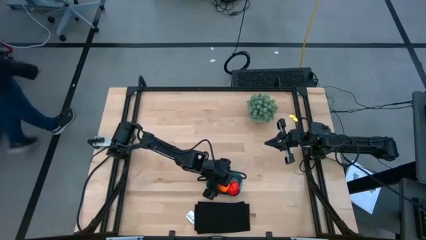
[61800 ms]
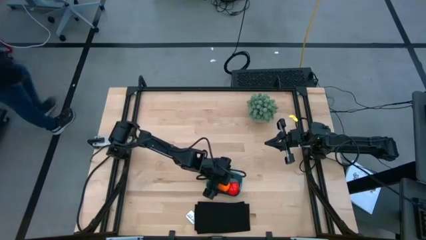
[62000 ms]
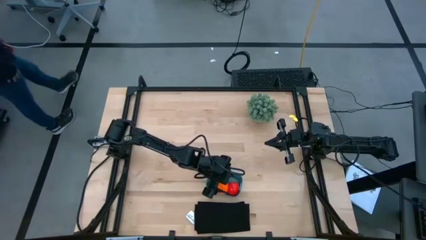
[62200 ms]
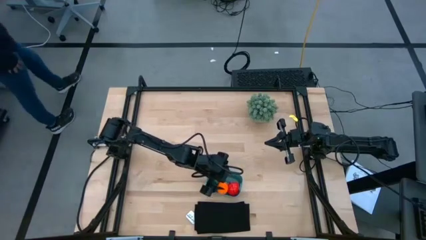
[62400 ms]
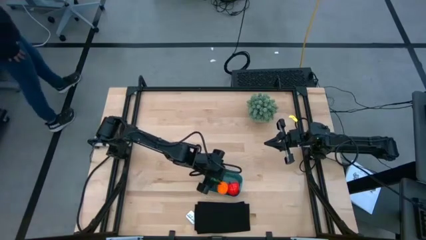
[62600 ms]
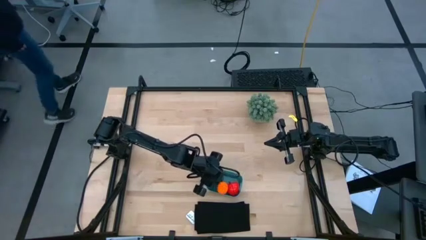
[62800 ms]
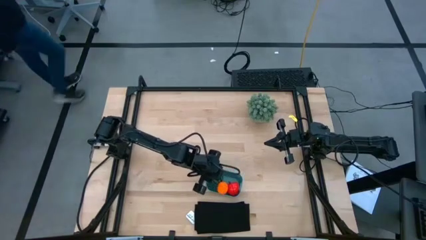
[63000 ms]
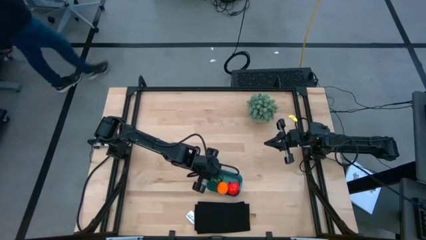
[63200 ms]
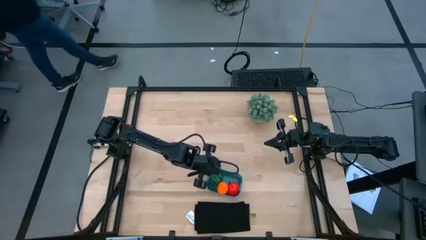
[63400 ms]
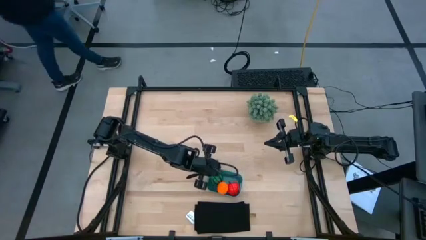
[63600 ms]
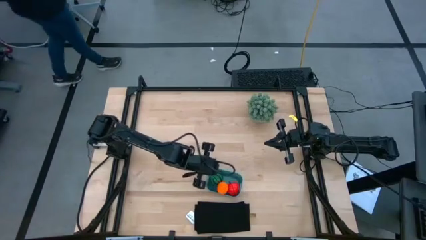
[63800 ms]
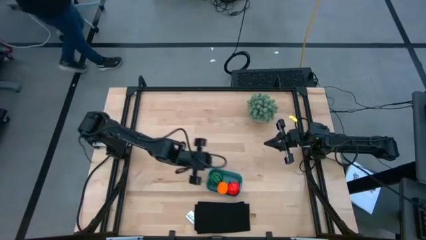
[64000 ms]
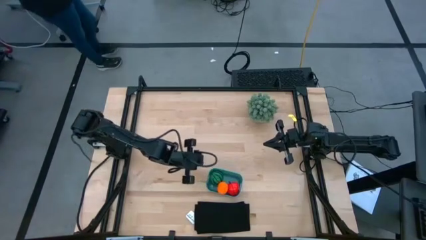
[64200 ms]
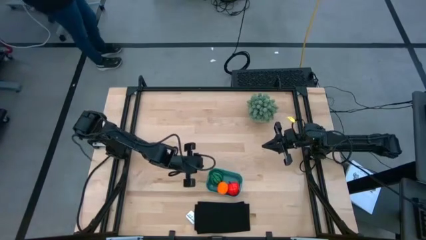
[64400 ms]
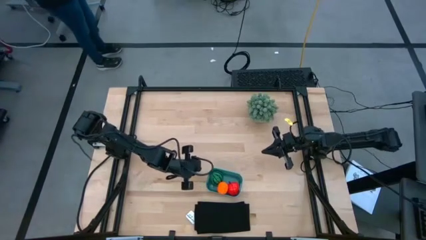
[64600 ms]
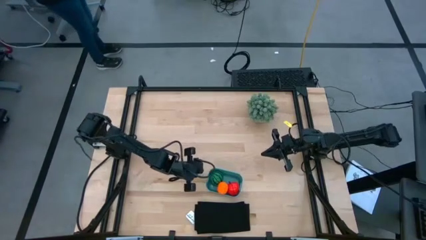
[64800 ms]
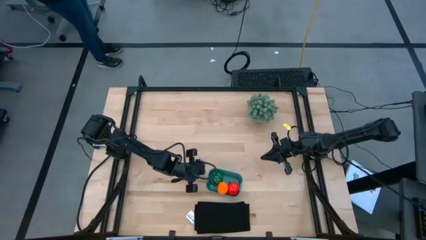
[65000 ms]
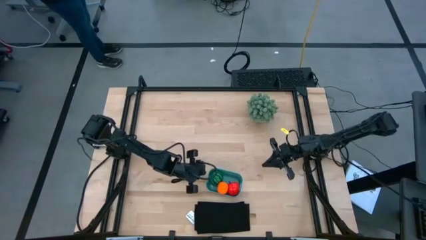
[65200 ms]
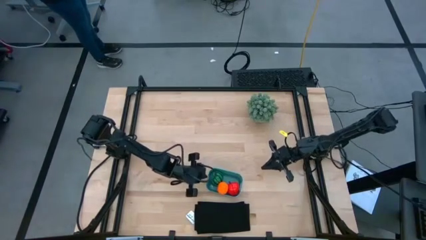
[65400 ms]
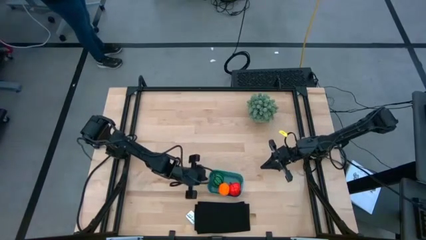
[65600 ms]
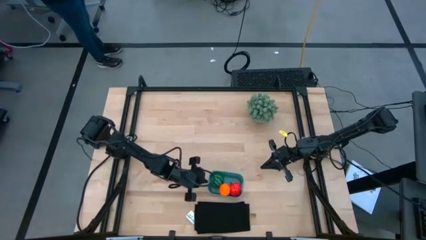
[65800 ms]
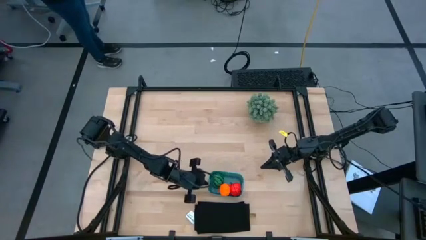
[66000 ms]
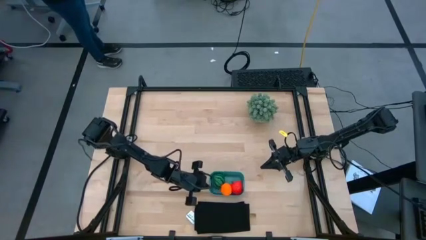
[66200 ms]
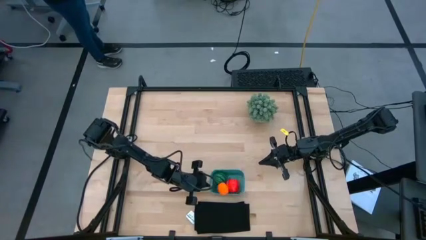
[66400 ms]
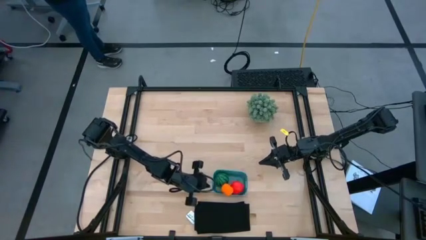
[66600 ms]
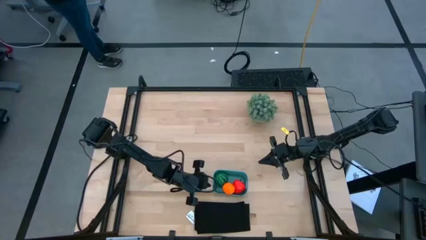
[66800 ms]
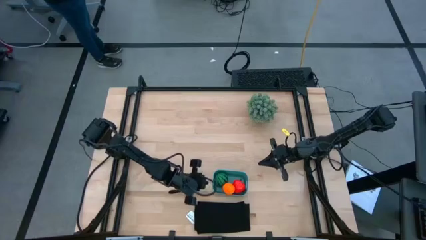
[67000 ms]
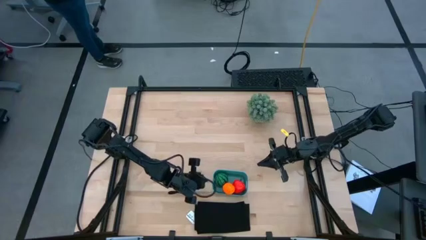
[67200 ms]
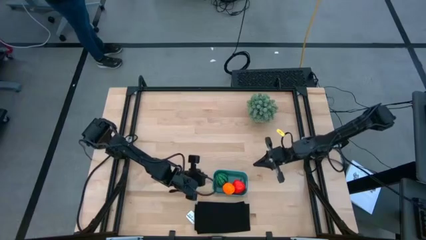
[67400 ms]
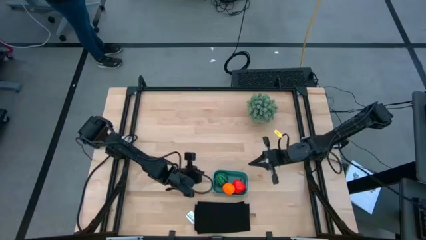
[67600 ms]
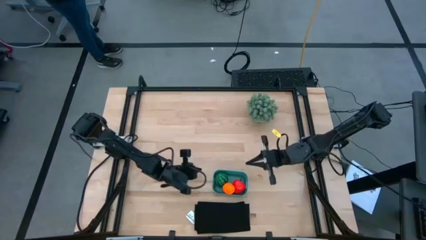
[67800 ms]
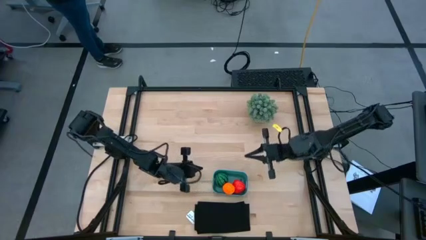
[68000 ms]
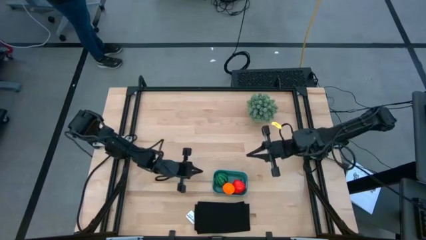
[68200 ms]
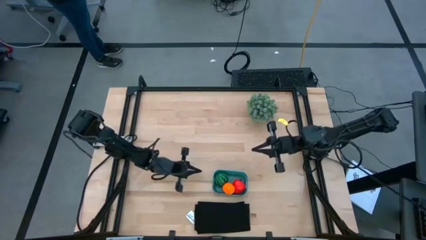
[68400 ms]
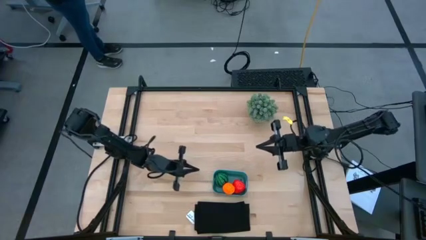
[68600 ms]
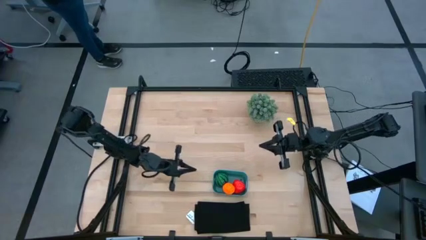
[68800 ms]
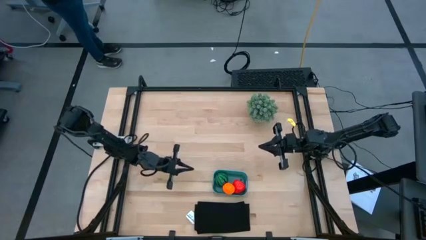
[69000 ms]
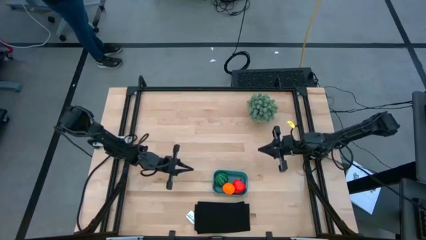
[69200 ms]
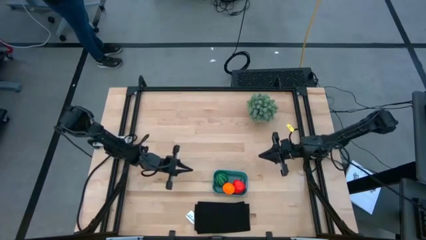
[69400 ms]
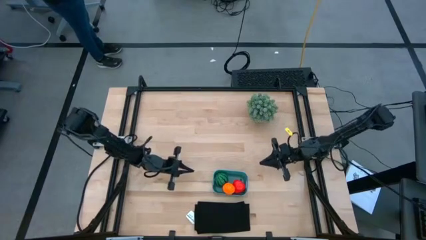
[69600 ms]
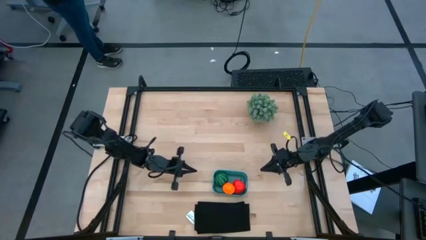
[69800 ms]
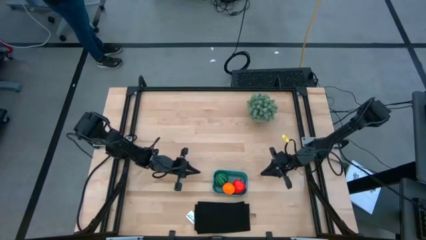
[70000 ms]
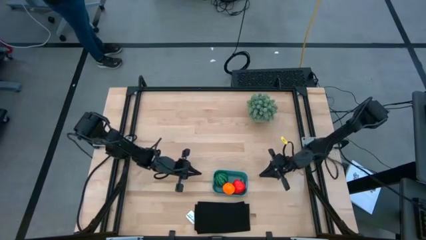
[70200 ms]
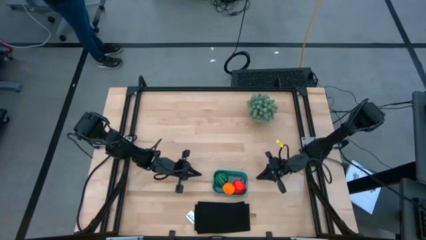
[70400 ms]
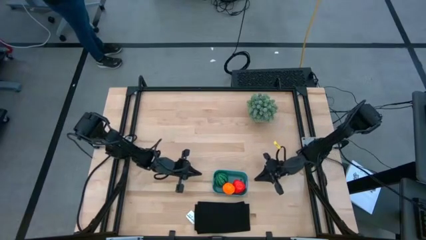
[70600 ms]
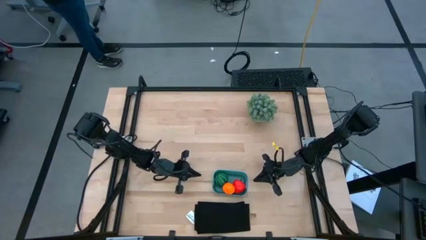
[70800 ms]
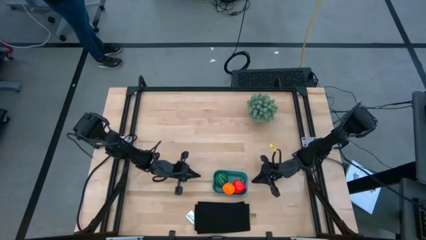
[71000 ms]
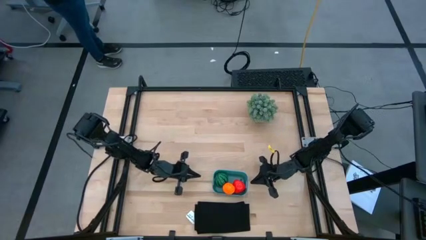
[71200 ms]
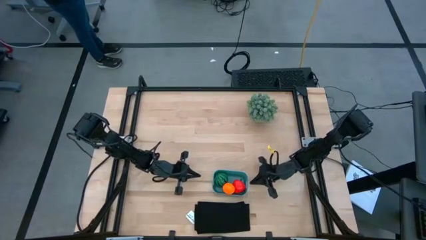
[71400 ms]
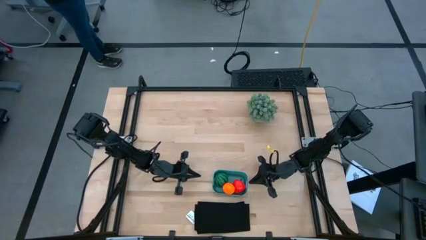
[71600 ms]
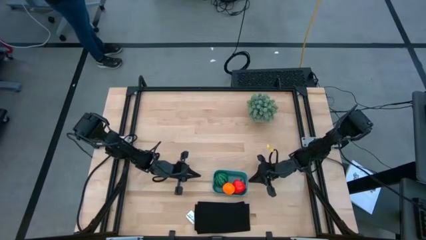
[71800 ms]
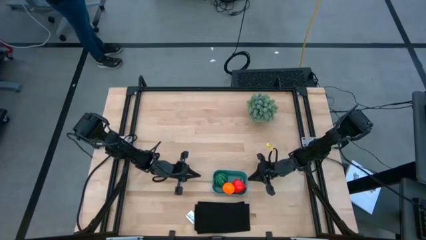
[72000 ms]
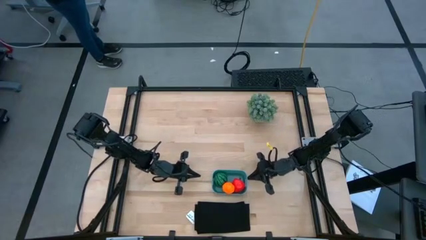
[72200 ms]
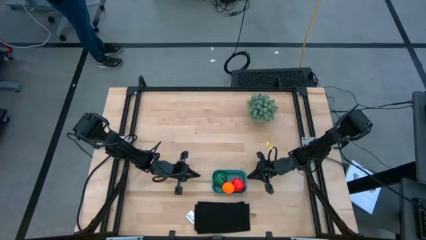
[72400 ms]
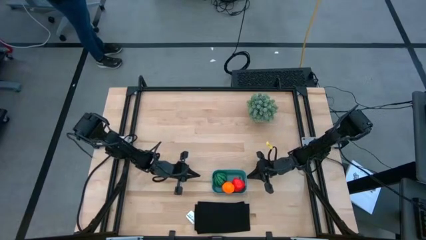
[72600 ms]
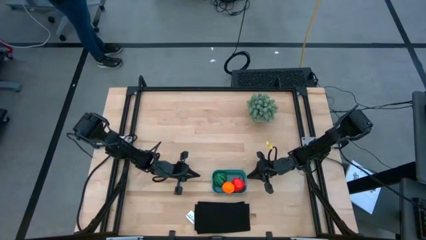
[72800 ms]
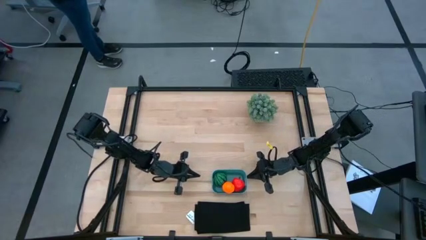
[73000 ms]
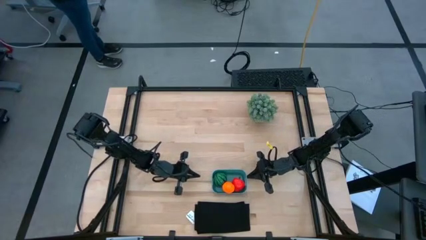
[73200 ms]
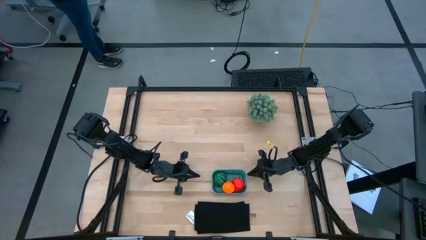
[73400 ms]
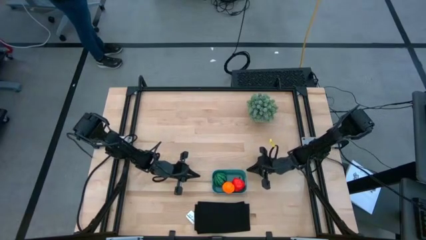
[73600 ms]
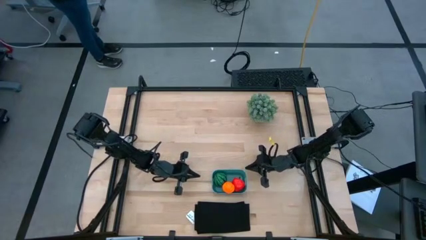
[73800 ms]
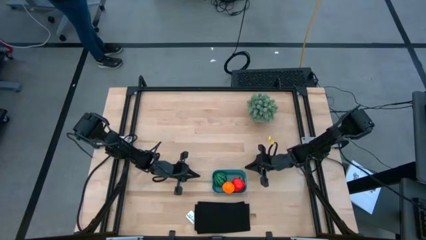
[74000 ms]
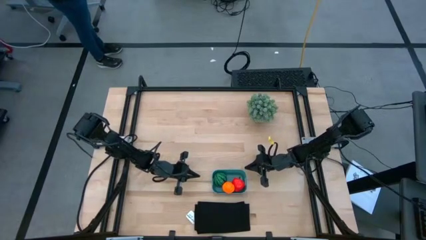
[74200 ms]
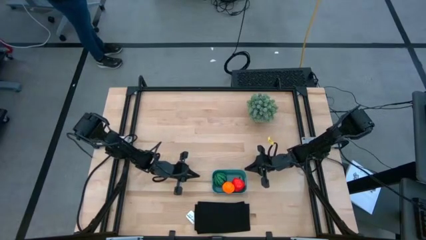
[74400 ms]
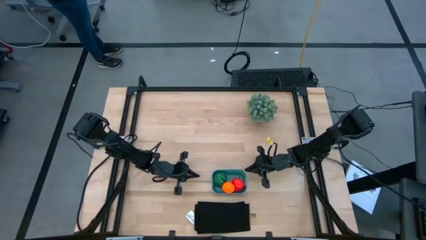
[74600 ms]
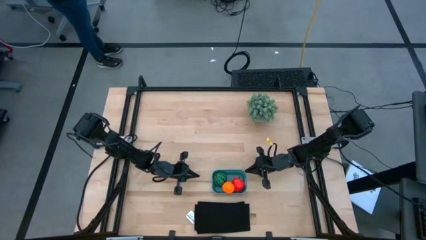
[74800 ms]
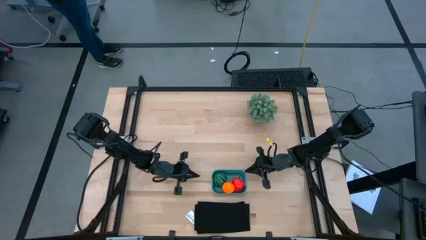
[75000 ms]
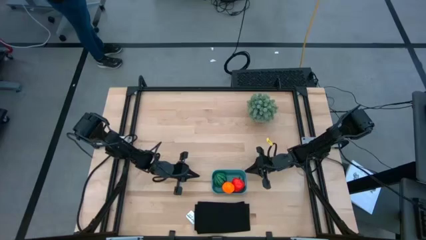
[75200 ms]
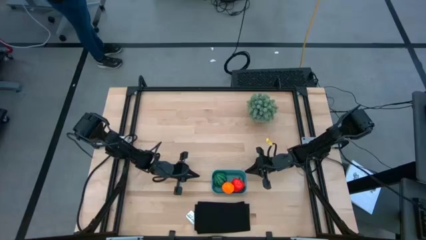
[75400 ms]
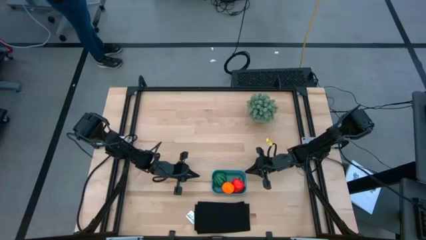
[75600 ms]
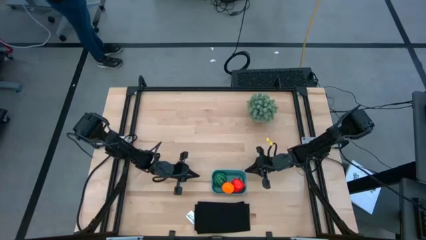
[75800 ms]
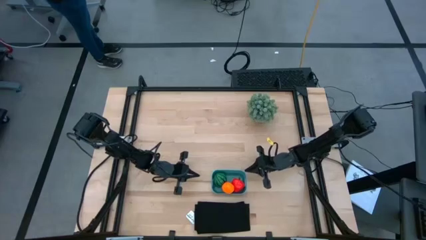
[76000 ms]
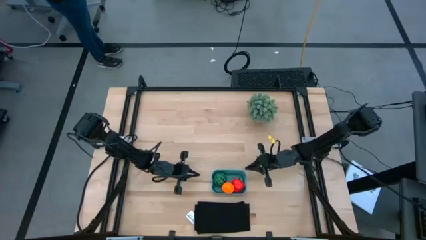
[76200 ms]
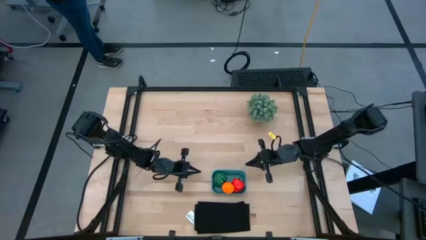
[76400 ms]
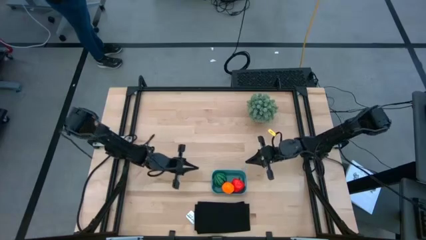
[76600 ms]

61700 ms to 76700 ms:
Task: Pick and placing Produce into tupperware
Adjust the green bin

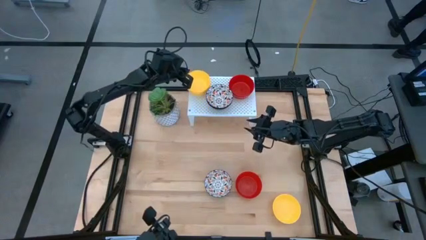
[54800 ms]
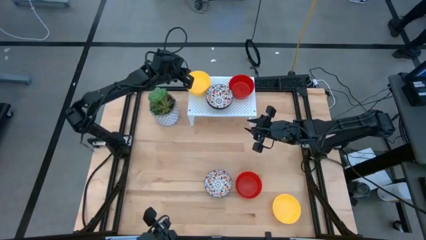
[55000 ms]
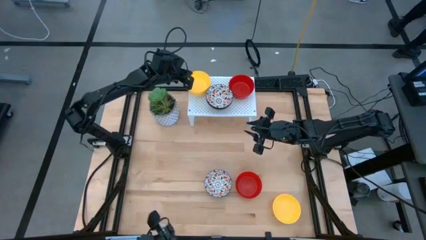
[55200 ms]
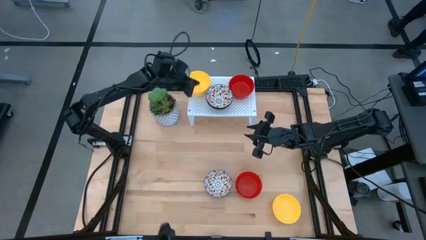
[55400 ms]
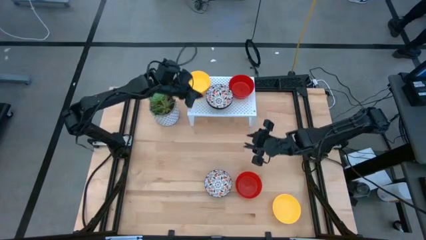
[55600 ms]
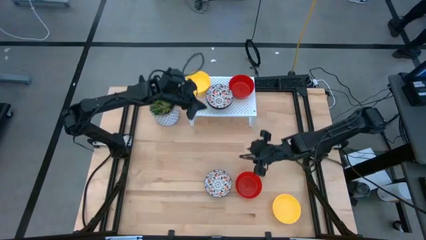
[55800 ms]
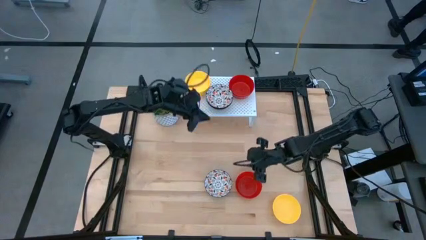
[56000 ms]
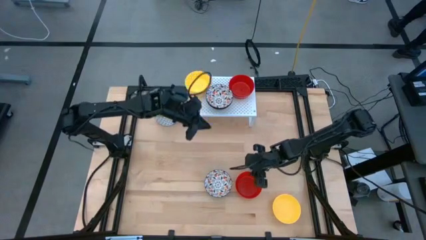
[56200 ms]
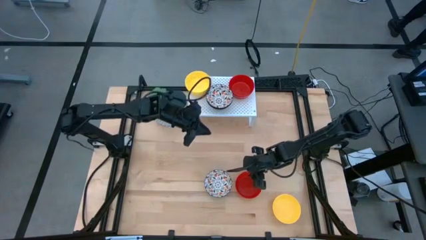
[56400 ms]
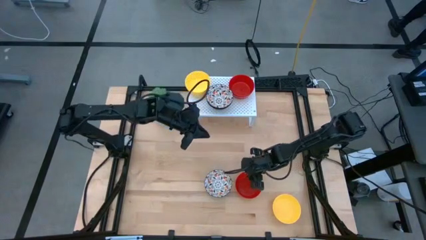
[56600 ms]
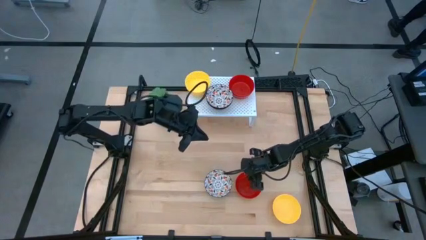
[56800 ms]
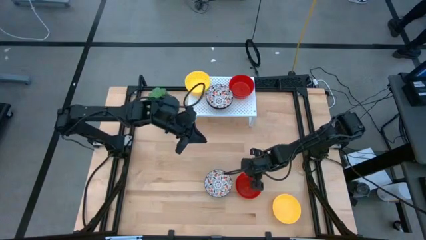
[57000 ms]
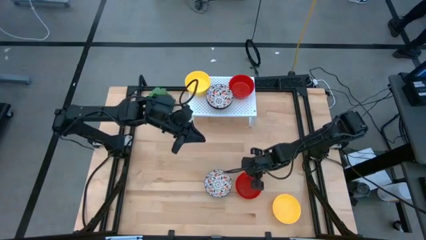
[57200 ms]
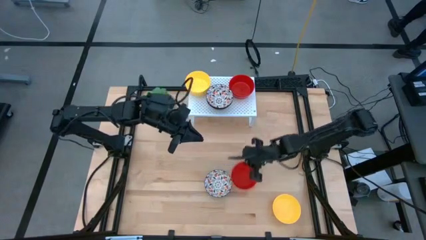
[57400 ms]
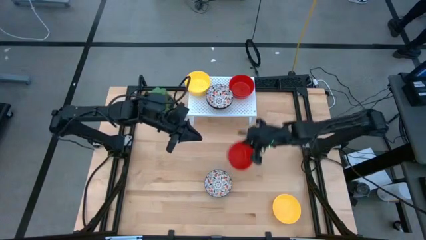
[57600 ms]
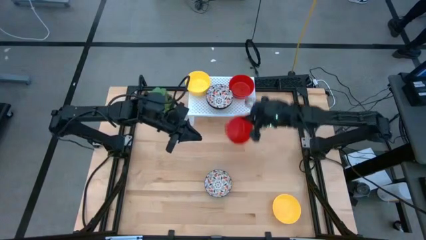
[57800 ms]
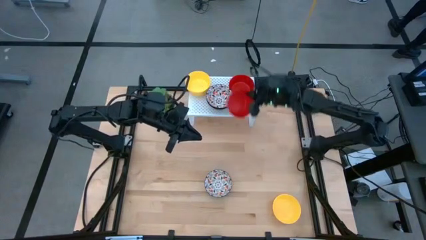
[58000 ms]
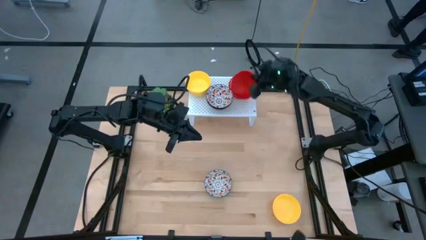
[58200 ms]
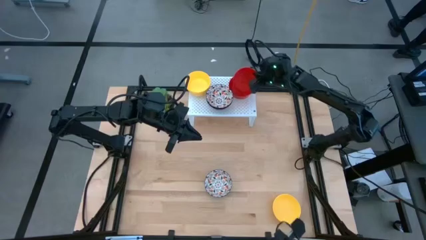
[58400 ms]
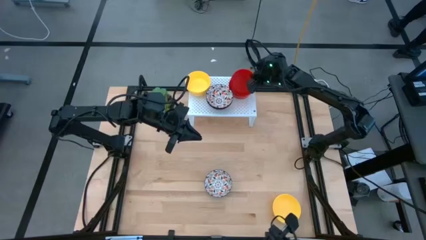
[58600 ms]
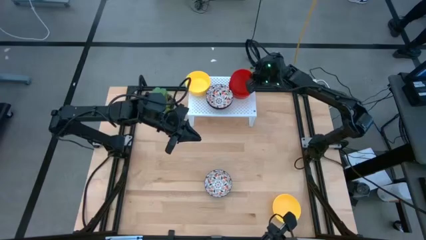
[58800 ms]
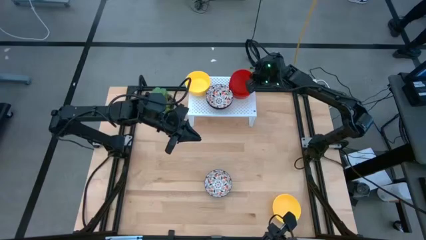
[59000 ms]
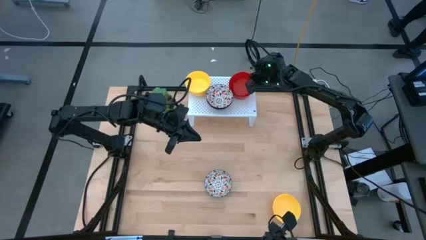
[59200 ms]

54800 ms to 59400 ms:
Task: Pick & Place Mini bowls
Stack the red bowl on top of the red bowl on the shelf
